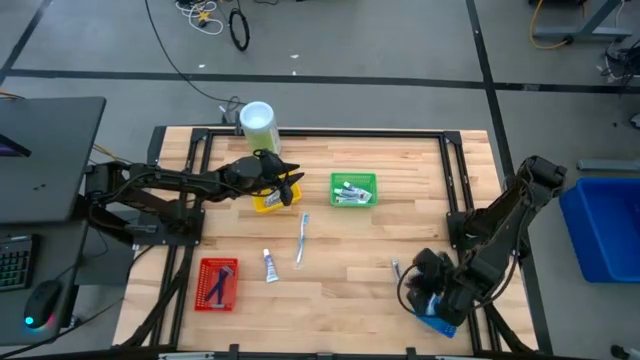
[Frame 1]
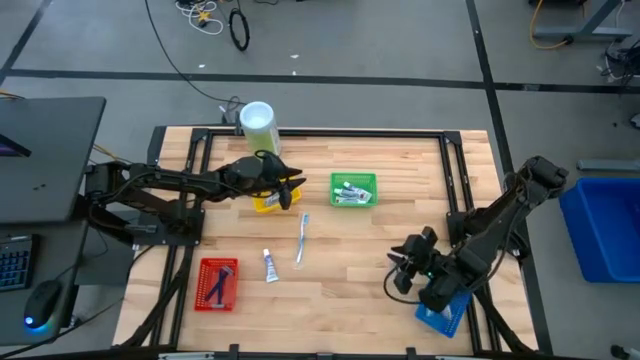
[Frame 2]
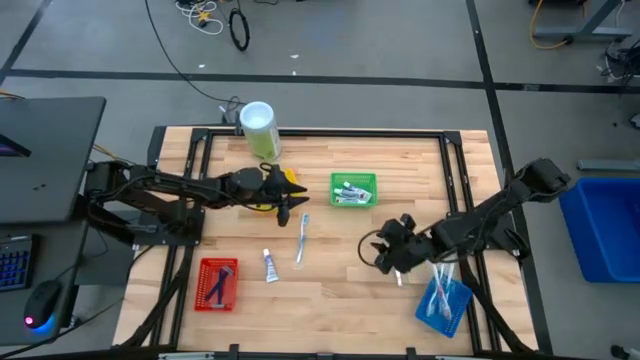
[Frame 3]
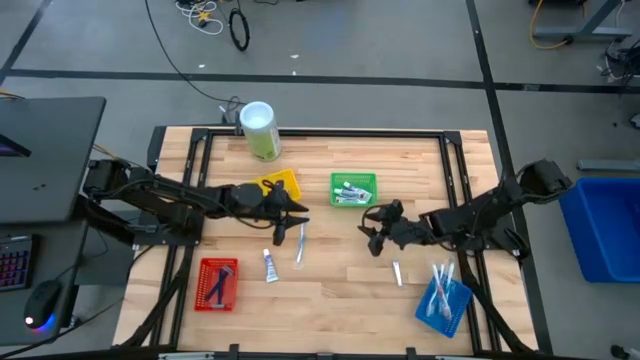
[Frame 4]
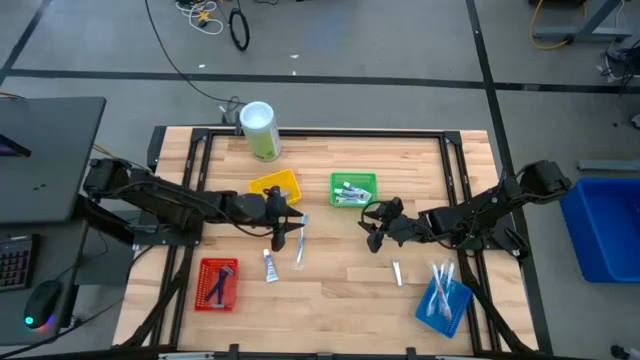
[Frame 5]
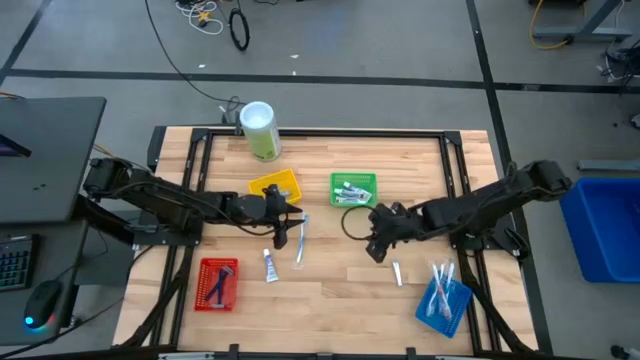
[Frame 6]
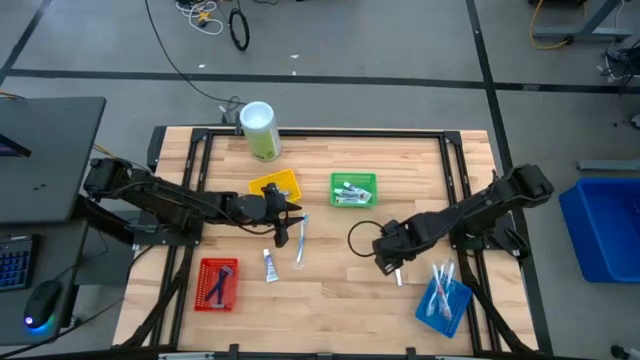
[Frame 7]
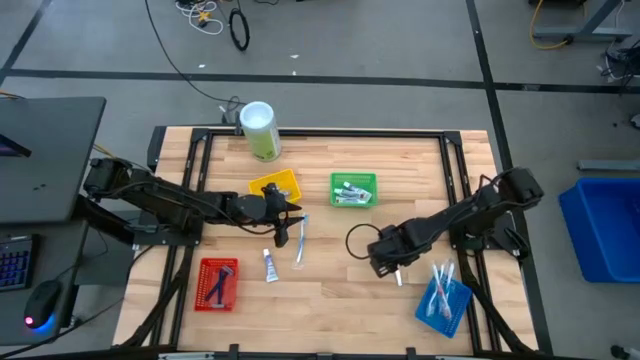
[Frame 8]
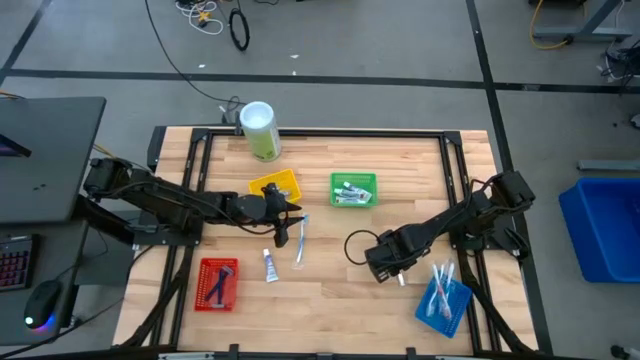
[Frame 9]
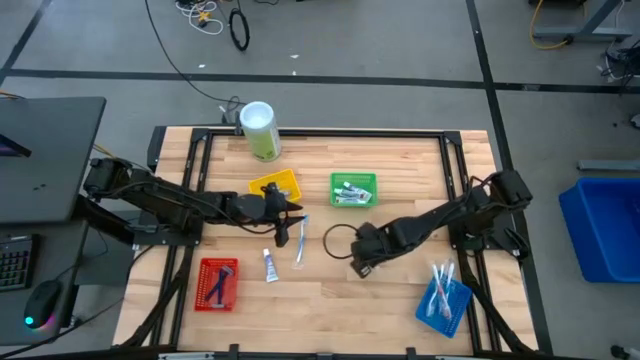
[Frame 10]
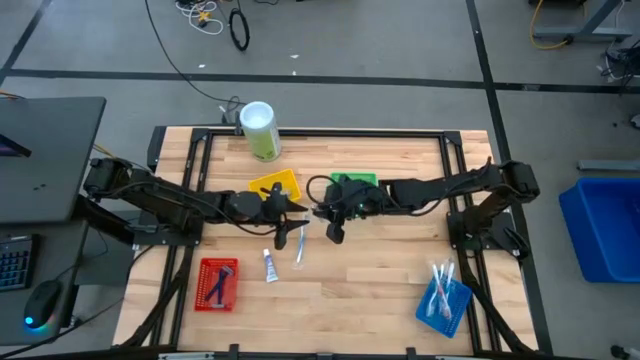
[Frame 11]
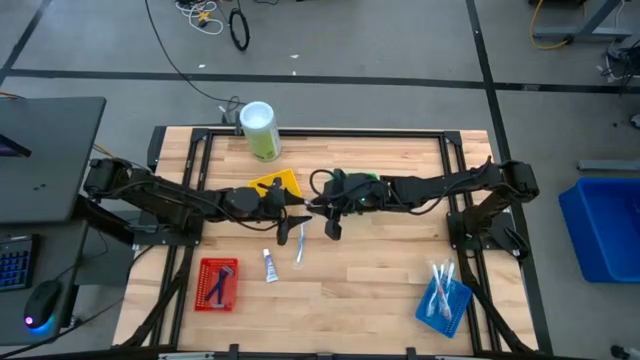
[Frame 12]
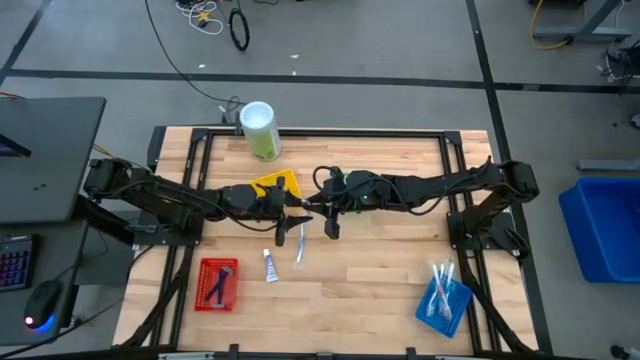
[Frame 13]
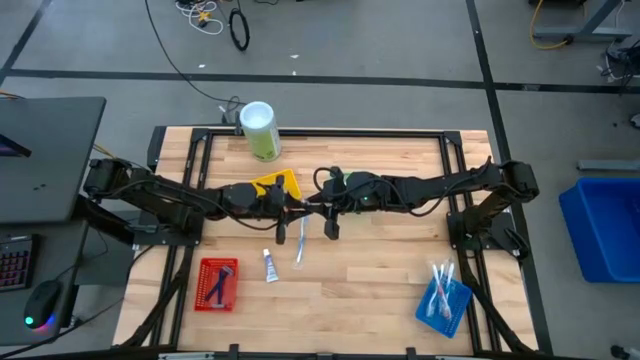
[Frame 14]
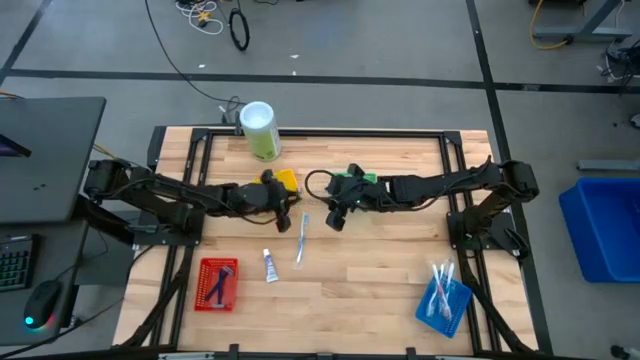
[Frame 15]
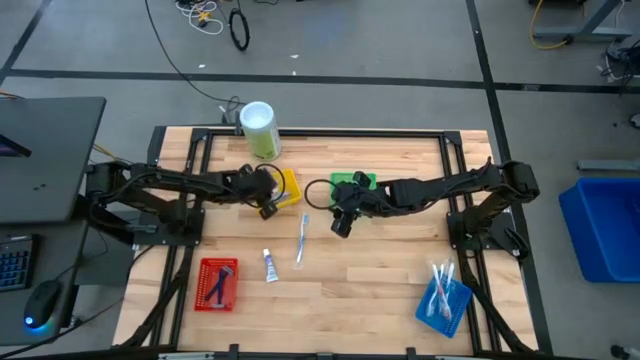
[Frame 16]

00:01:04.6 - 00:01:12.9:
Task: Pick & Place Travel size toiletries
Put the silver nail cutter into the yellow bin

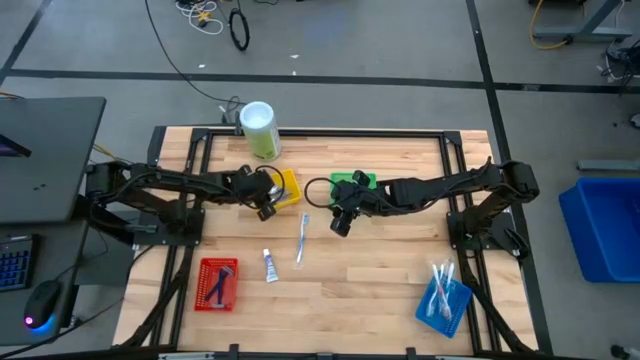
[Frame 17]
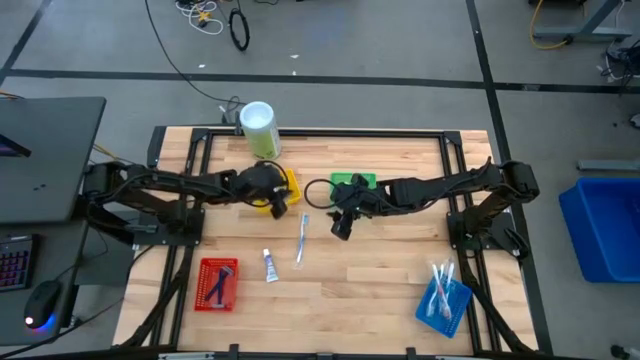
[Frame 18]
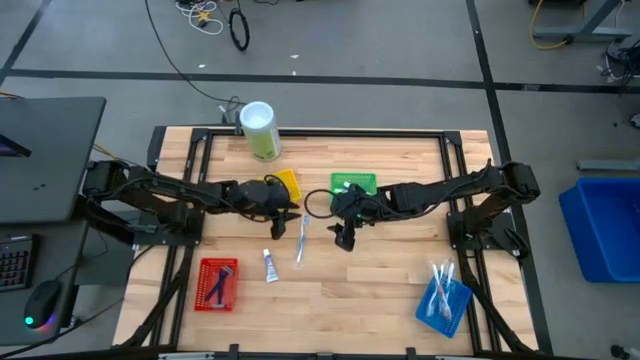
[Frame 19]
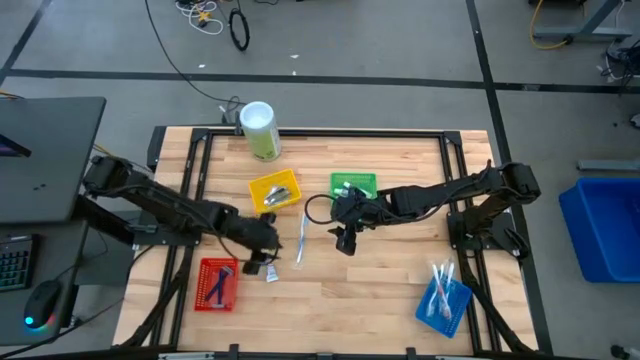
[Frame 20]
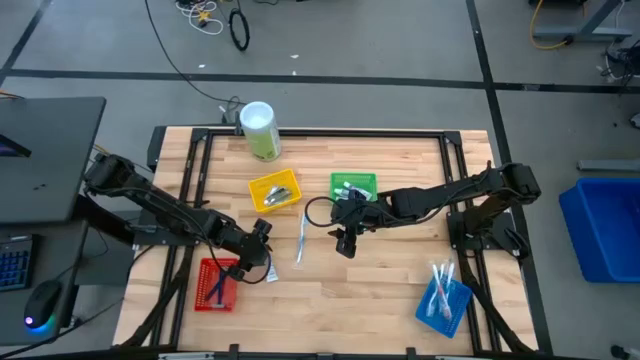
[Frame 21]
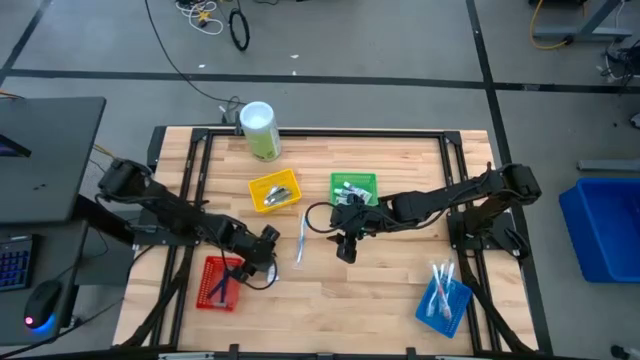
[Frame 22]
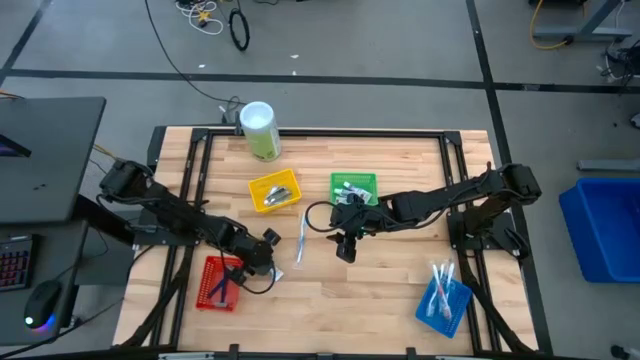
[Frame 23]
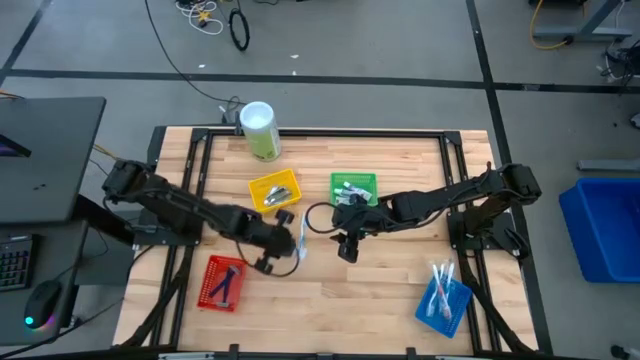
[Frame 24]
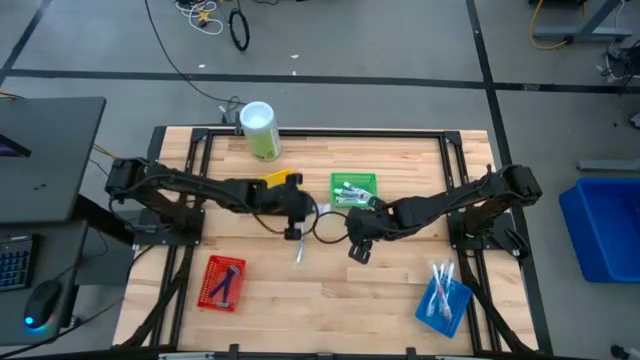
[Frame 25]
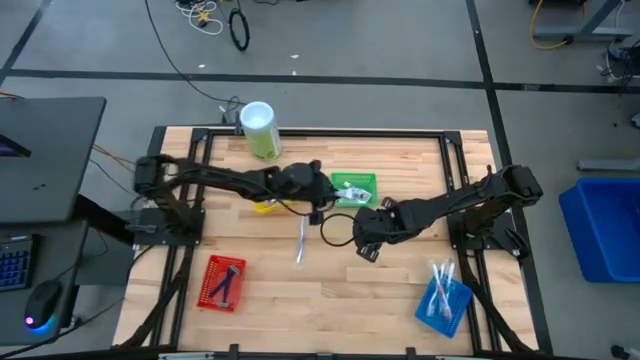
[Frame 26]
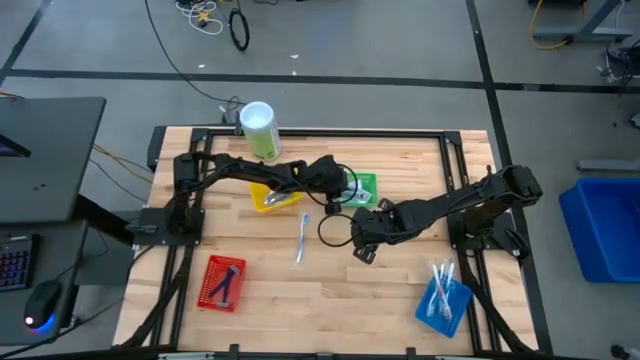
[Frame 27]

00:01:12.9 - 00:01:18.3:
Put the white toothpaste into the green bin

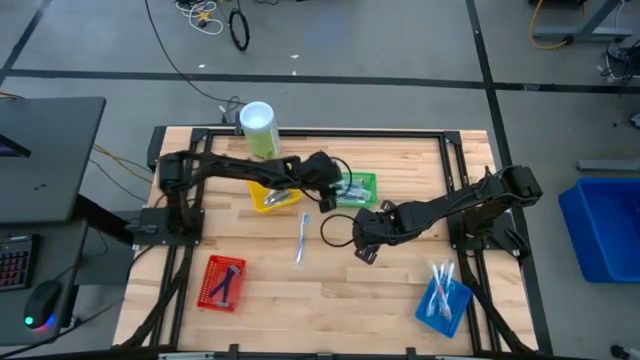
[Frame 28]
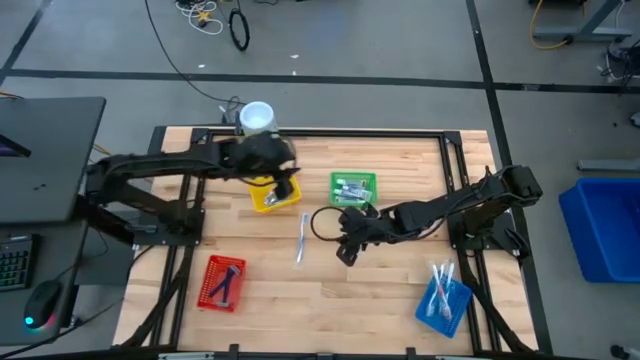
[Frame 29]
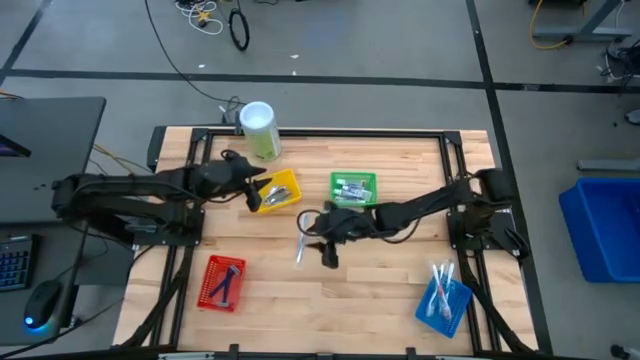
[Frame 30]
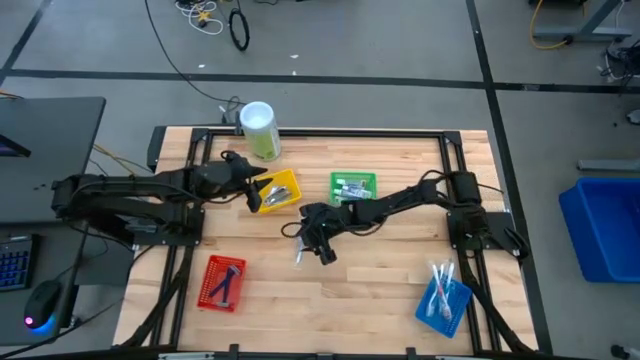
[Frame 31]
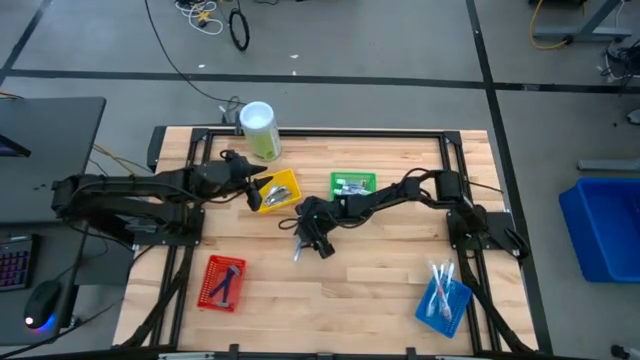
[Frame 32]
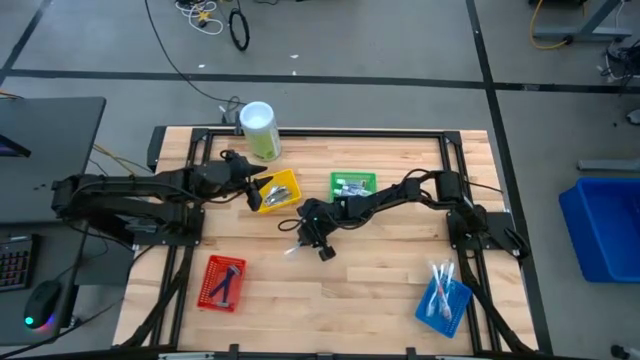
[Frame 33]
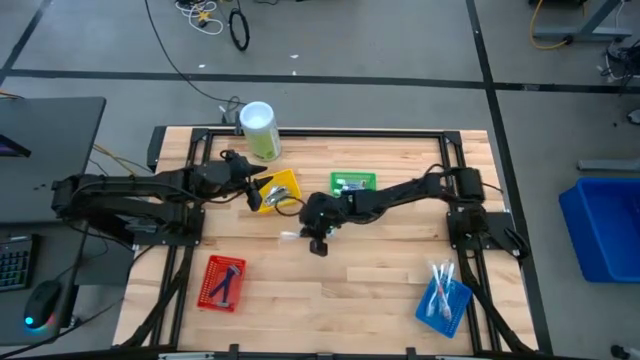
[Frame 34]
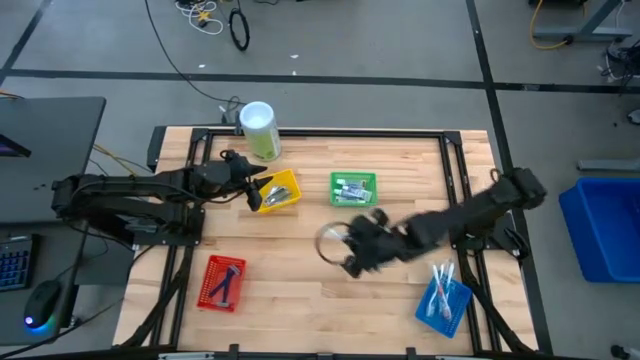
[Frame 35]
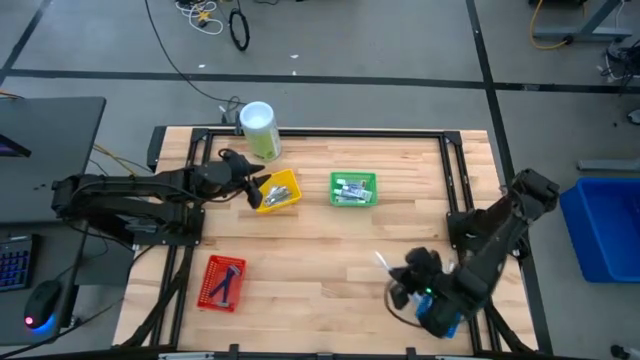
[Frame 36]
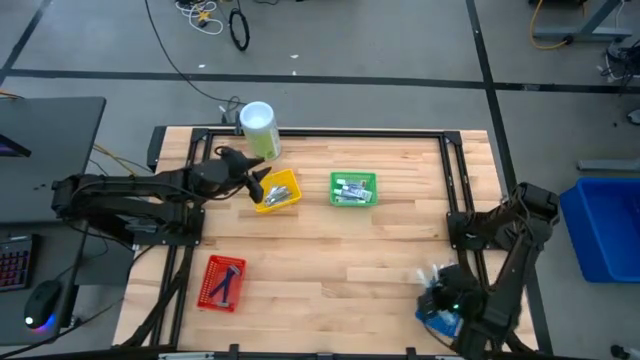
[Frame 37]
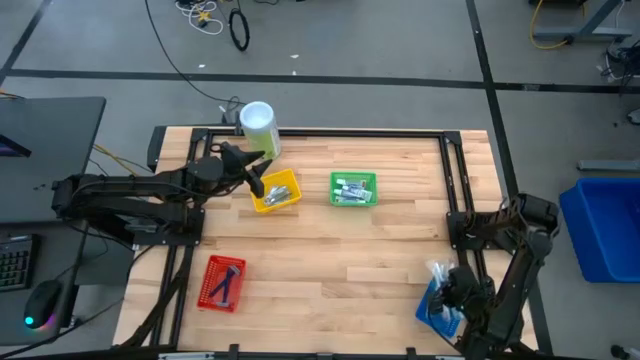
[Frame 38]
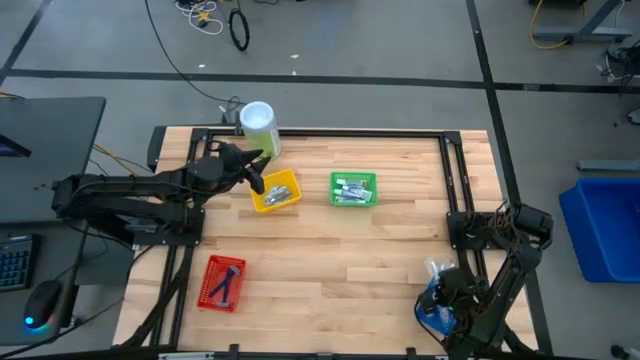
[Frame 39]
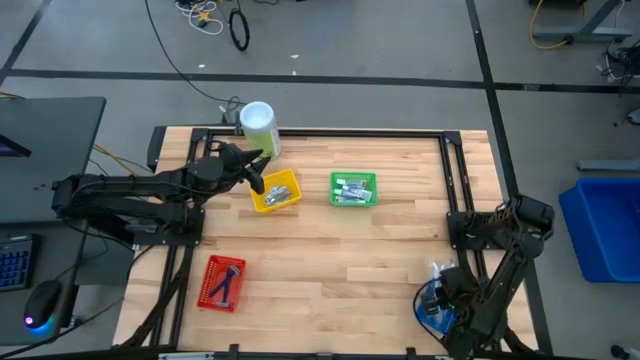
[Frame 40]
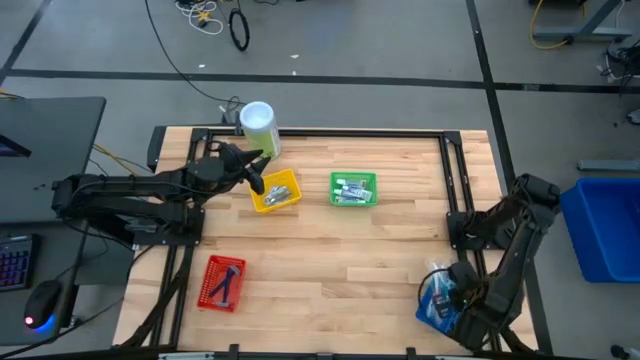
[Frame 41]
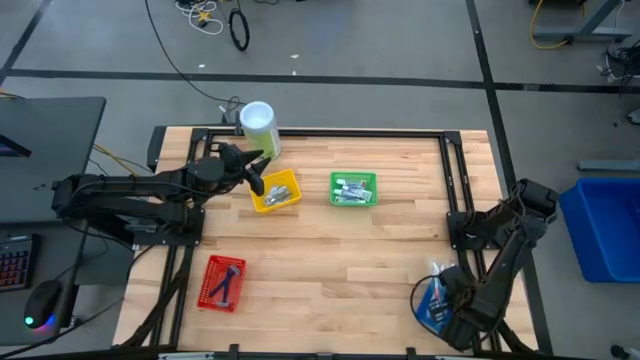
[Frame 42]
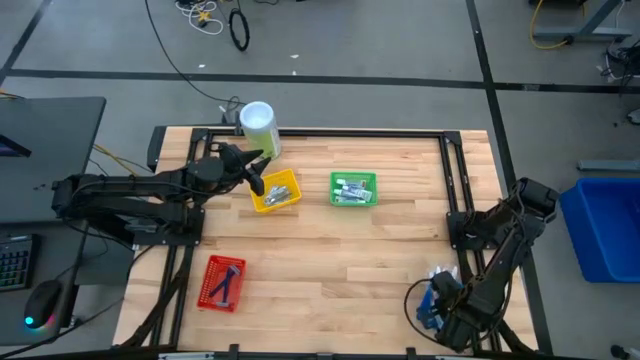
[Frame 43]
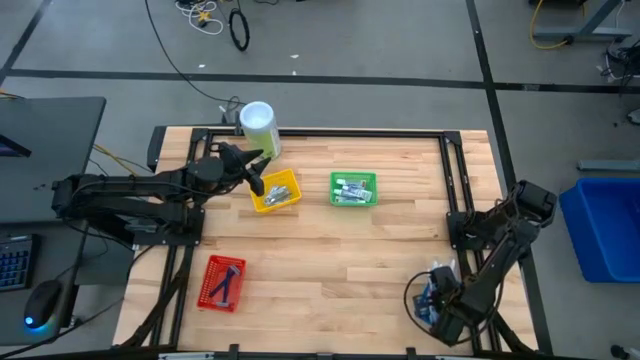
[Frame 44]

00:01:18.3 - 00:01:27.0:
Put the blue toothbrush into the blue bin
